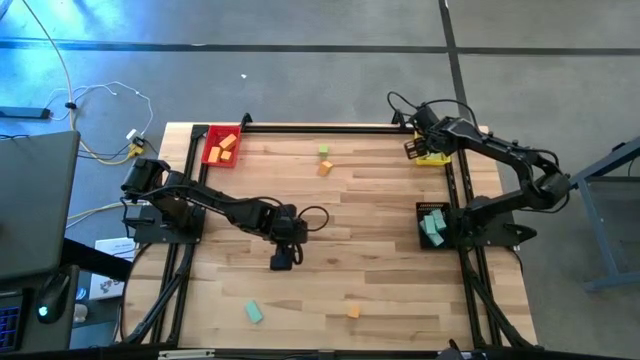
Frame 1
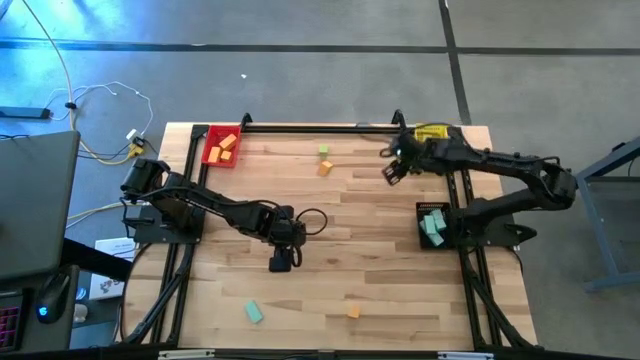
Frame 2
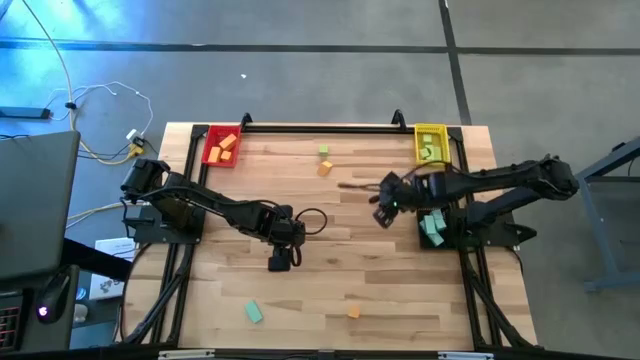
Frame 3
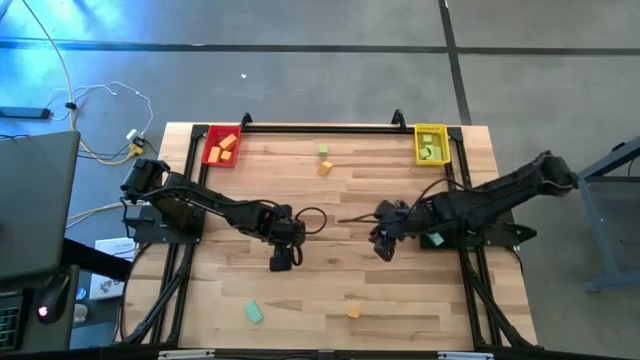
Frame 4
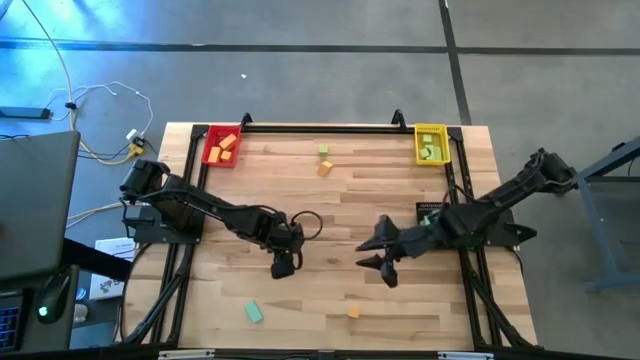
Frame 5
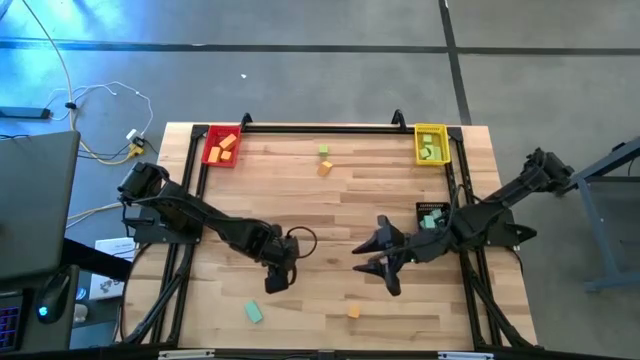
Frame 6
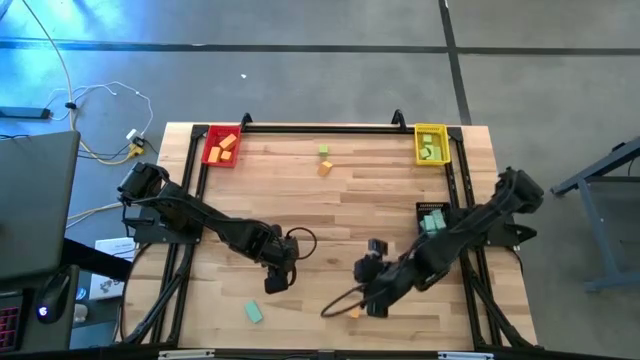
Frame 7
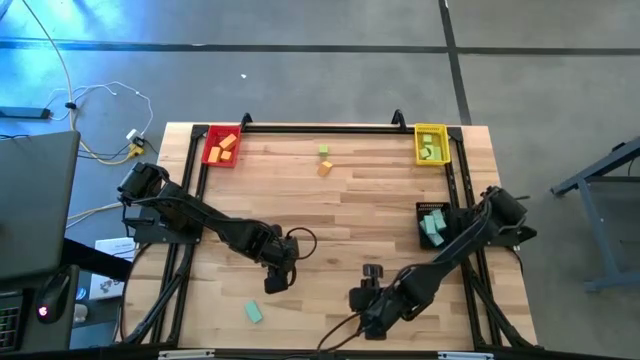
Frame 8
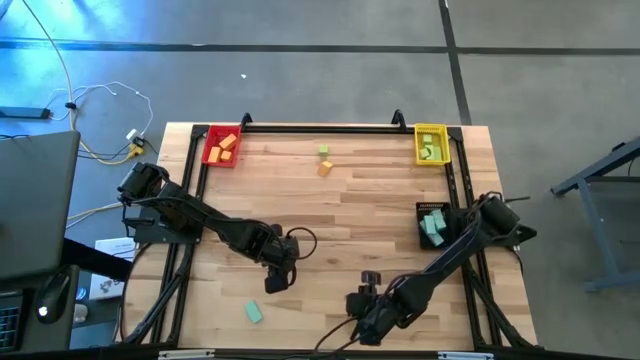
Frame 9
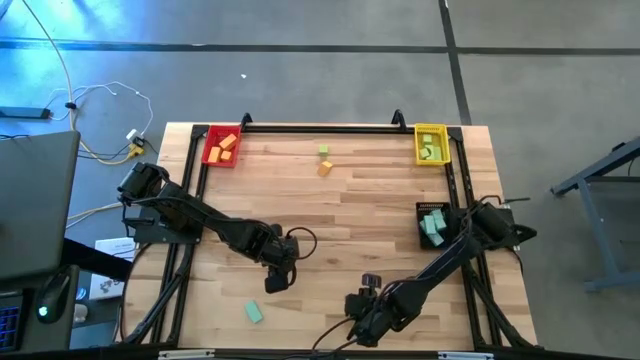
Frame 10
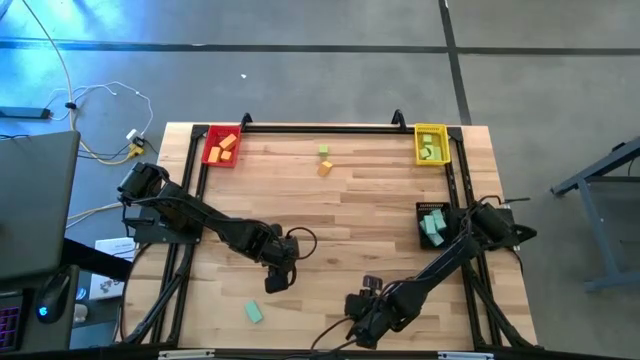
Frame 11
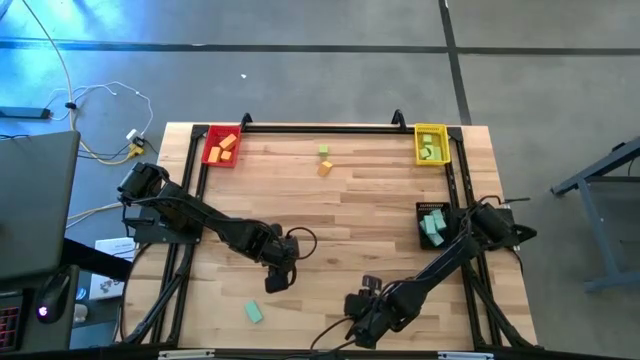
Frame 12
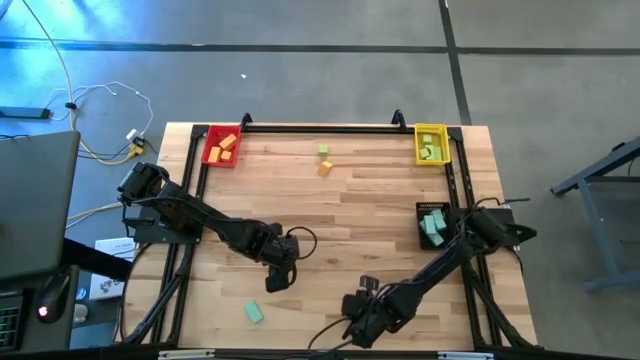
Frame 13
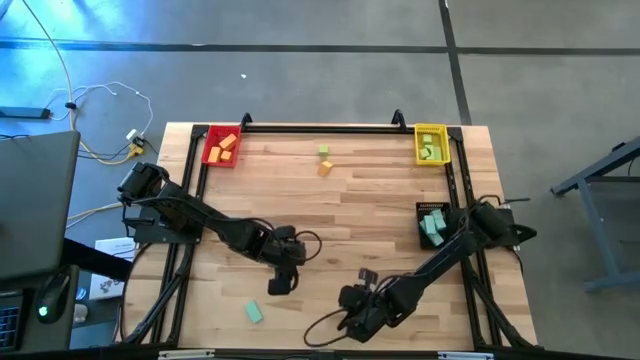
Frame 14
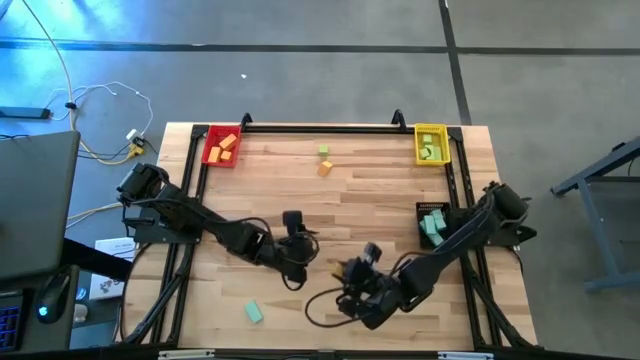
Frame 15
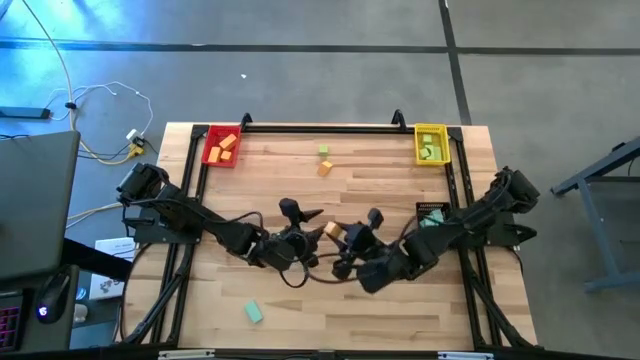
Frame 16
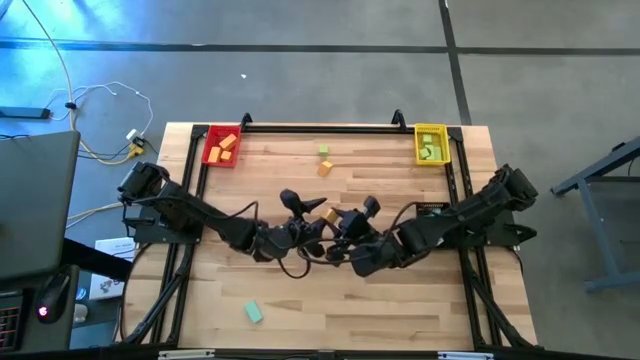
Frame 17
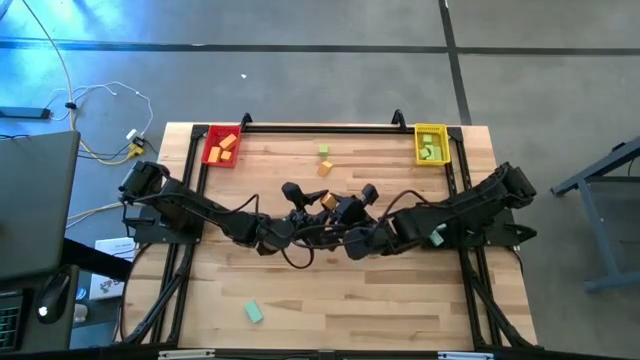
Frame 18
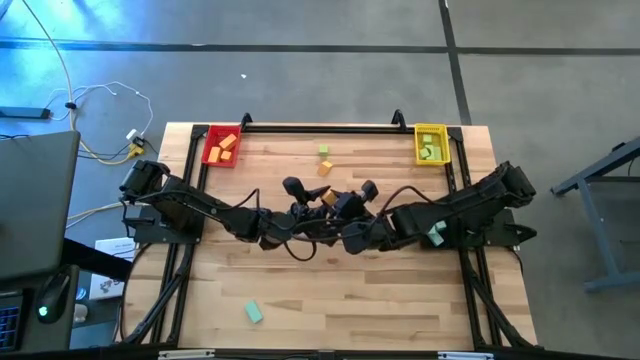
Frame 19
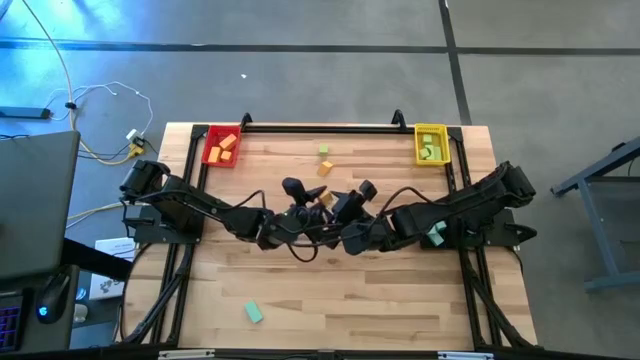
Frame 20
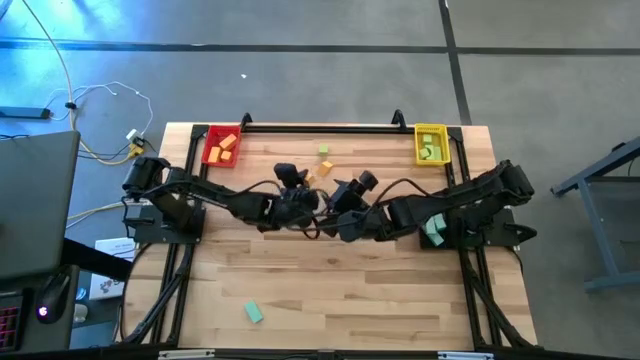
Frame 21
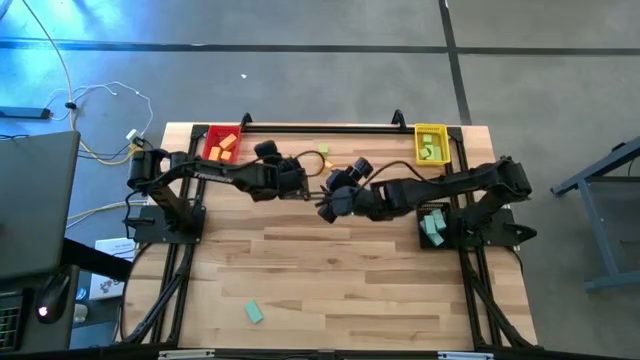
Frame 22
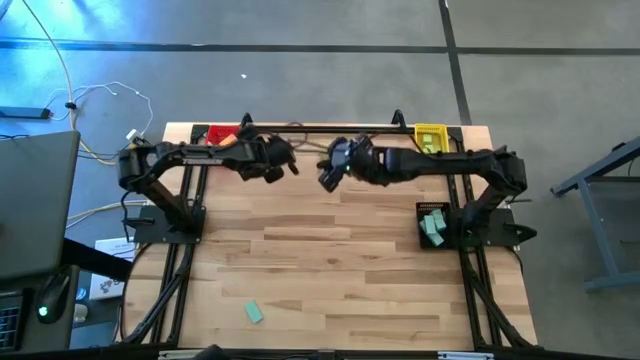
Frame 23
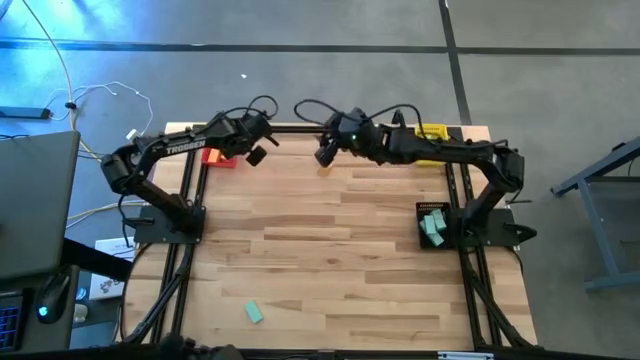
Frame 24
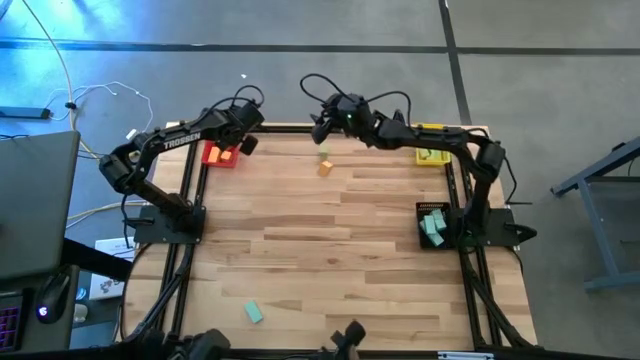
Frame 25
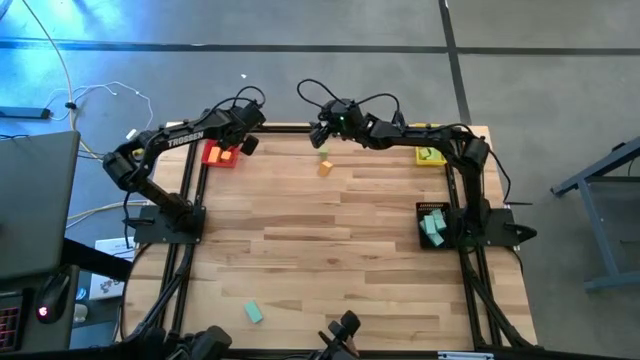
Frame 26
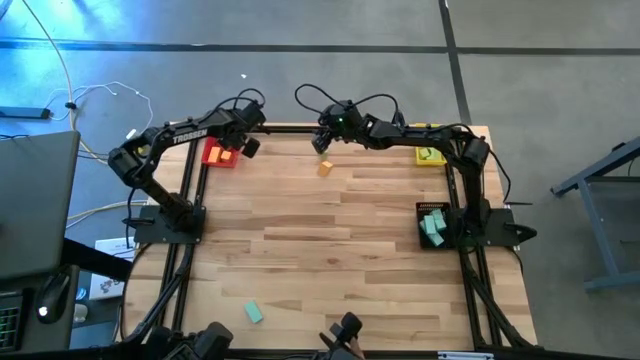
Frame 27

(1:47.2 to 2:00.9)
Task: Sort & place blocks by color
Put the yellow block into the red bin

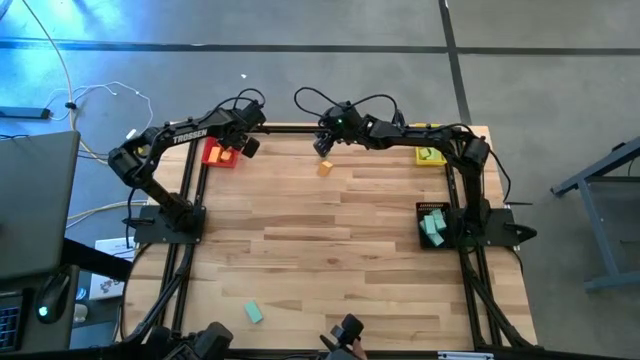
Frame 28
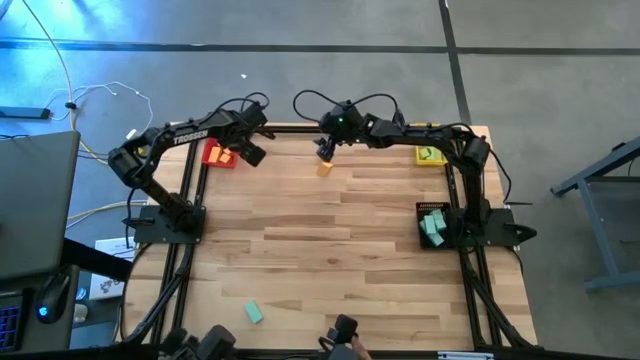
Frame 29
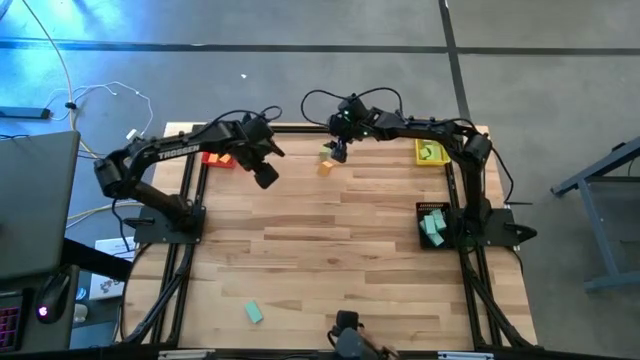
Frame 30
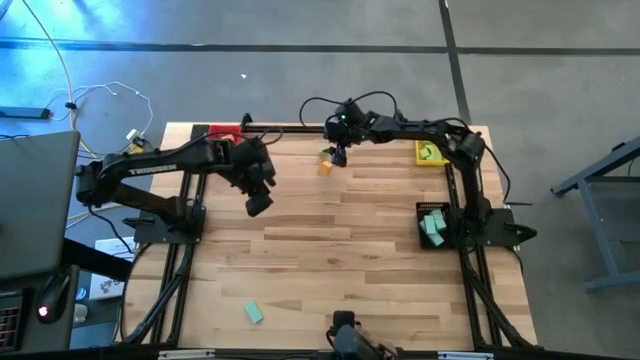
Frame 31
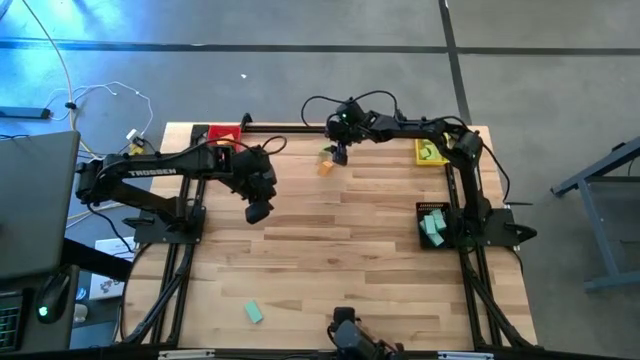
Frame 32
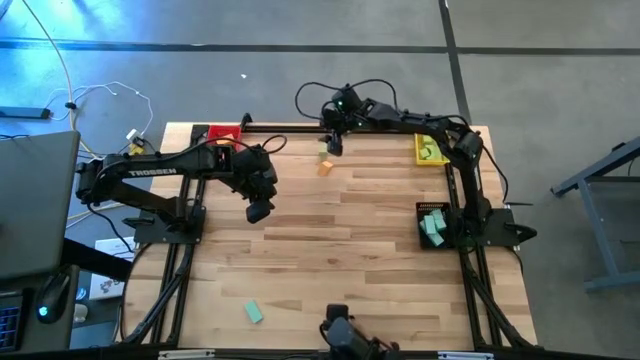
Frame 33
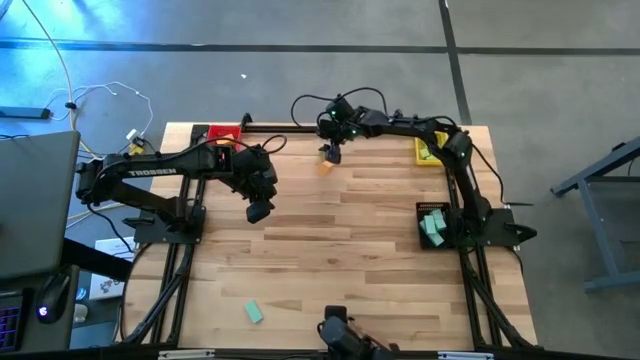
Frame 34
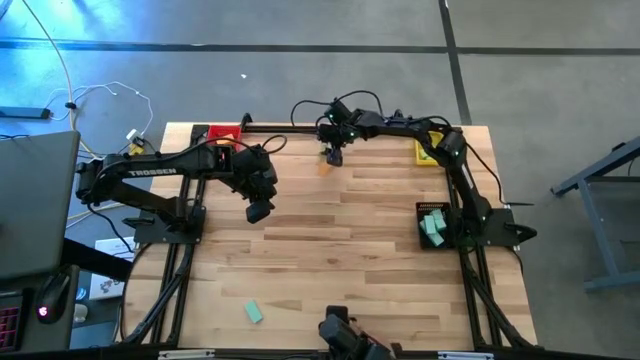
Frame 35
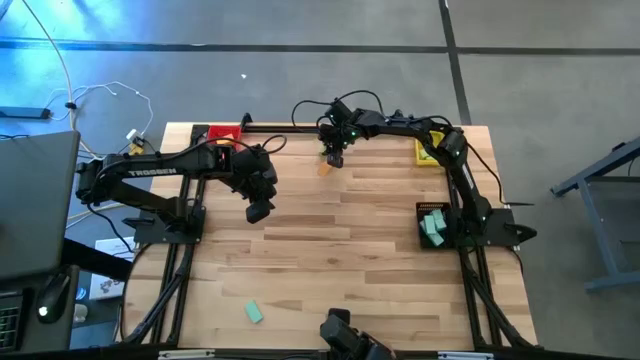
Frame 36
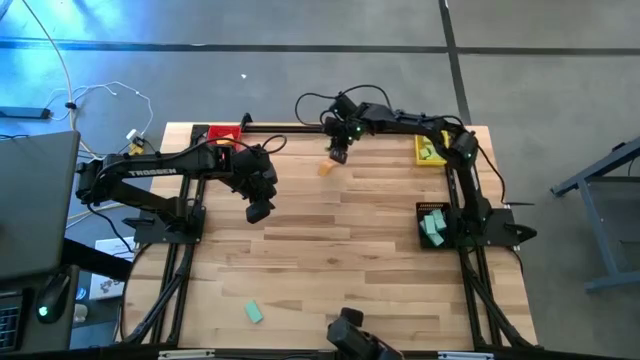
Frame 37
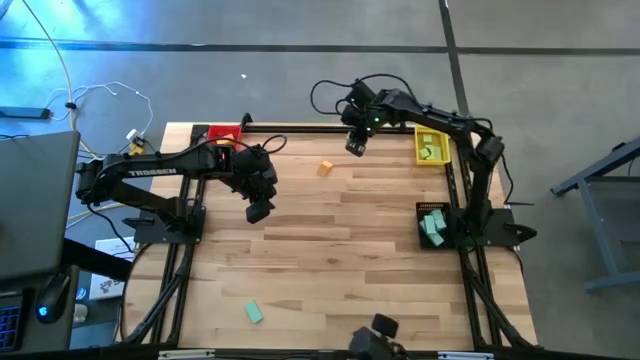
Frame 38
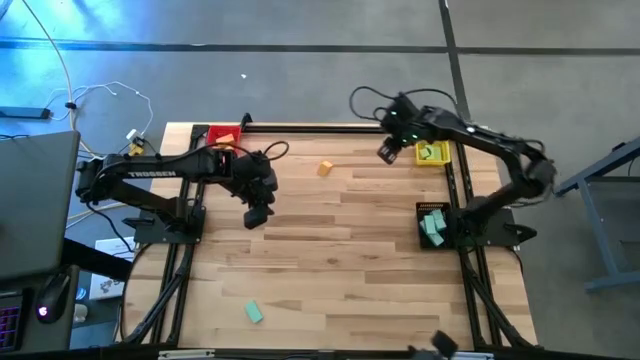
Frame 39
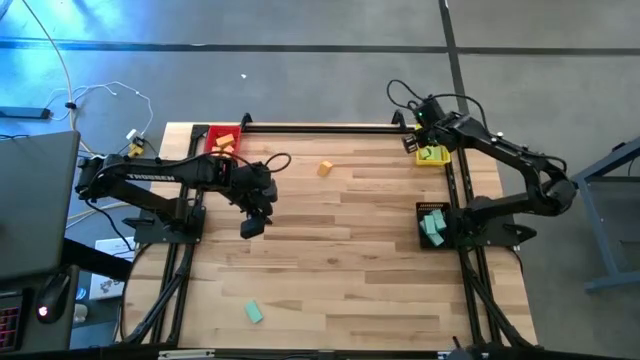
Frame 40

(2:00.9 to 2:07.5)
Put the green block into the yellow bin

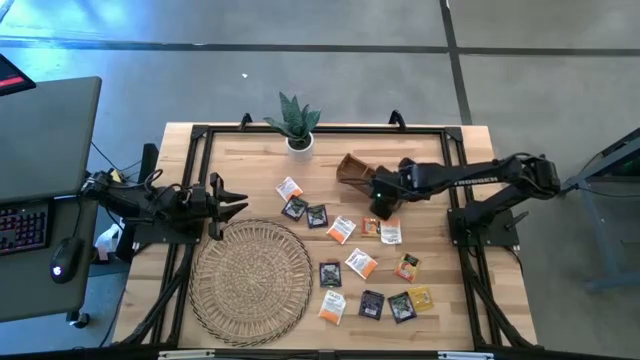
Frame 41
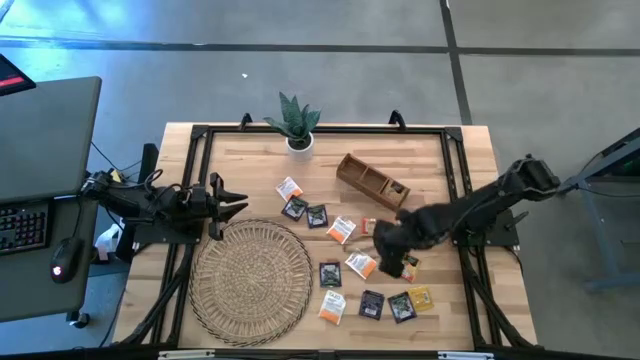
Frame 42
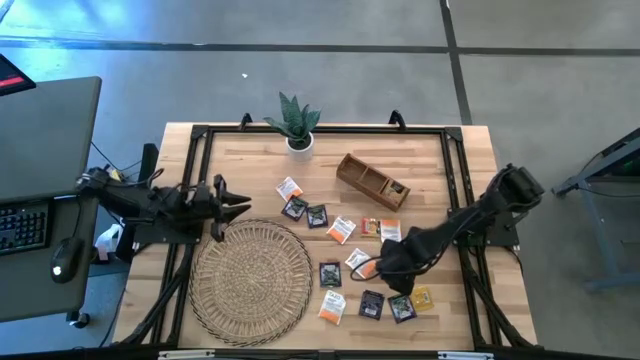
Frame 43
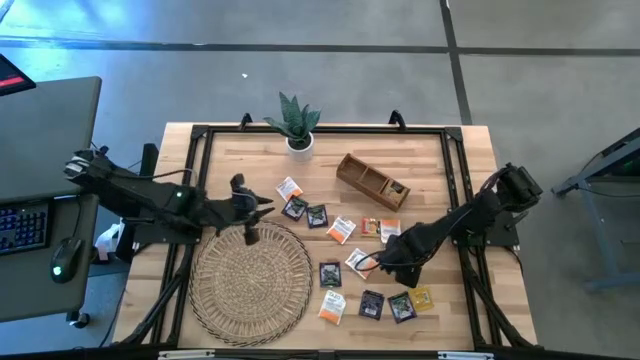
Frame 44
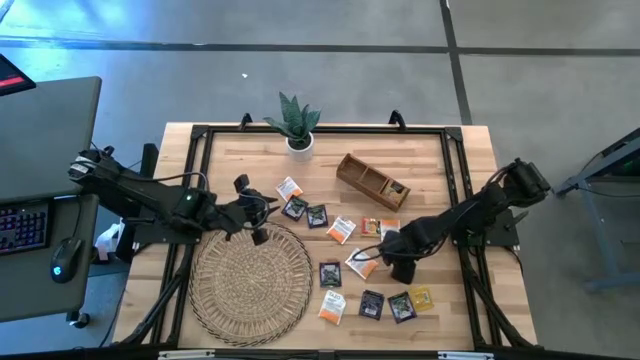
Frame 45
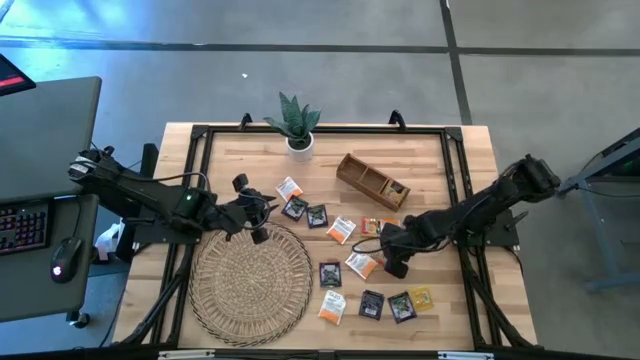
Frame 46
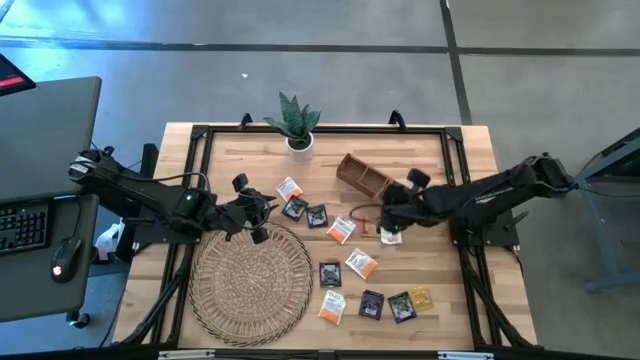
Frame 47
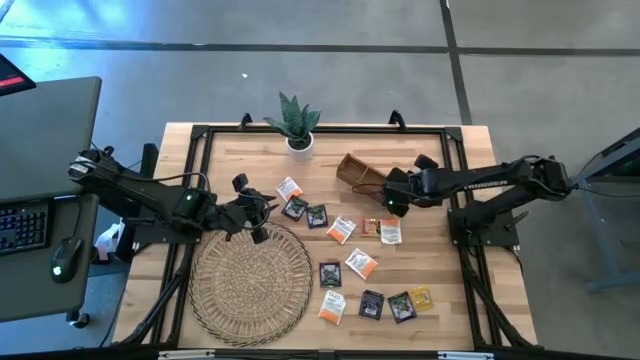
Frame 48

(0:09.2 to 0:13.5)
Task: Pick & Place Tea
Put the orange tea bag into the right section of the wooden organizer
